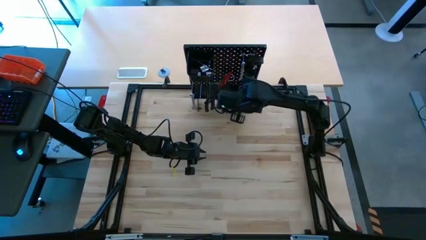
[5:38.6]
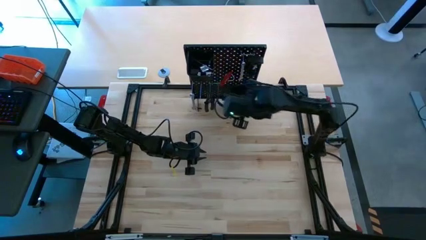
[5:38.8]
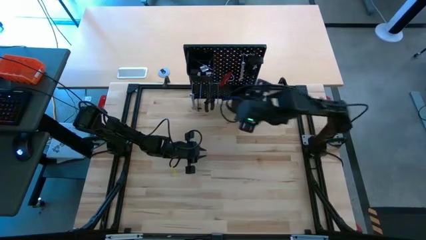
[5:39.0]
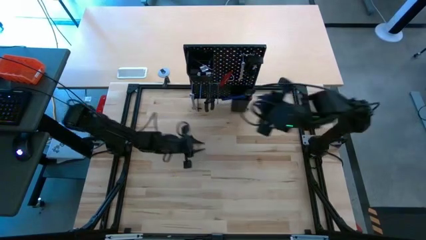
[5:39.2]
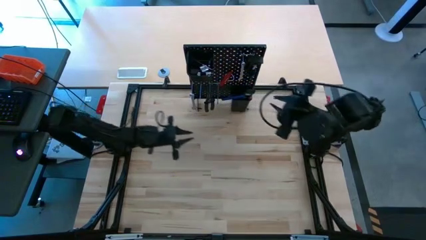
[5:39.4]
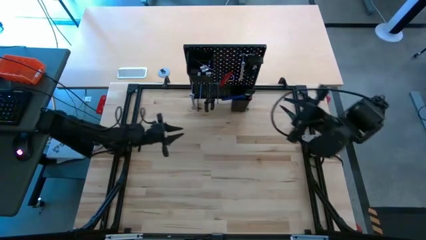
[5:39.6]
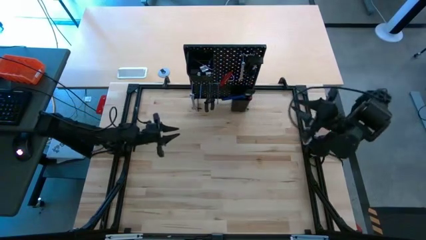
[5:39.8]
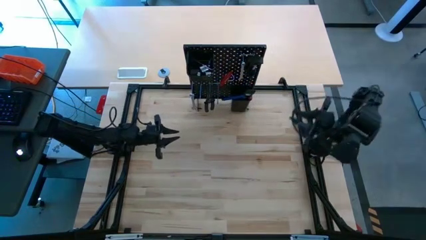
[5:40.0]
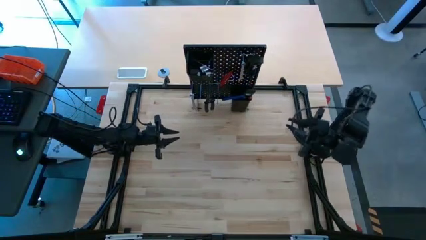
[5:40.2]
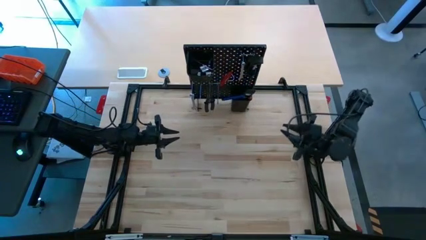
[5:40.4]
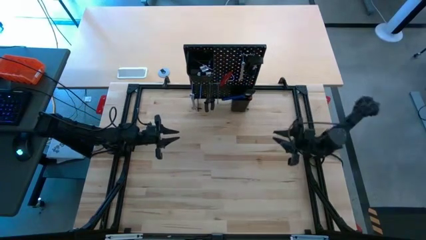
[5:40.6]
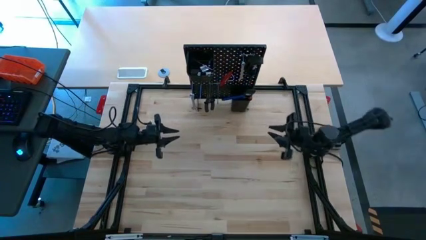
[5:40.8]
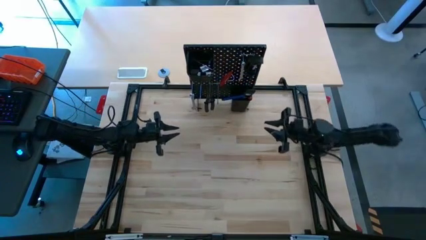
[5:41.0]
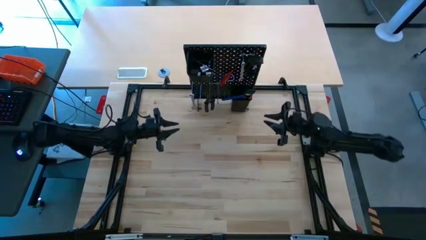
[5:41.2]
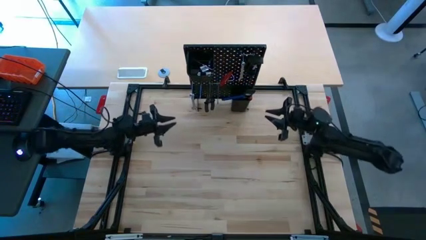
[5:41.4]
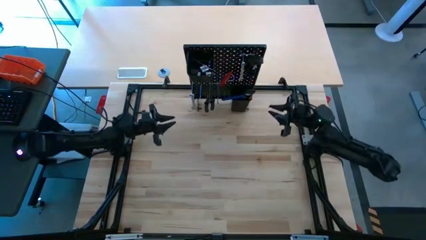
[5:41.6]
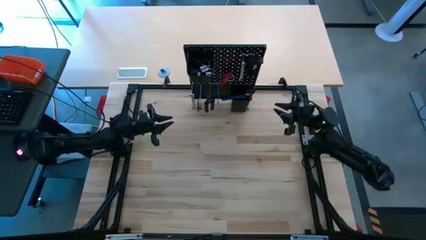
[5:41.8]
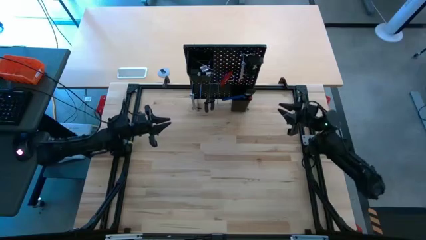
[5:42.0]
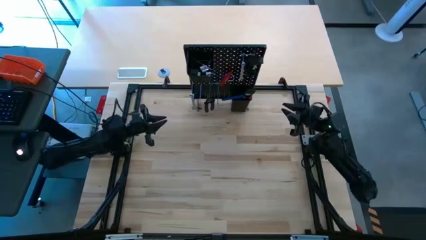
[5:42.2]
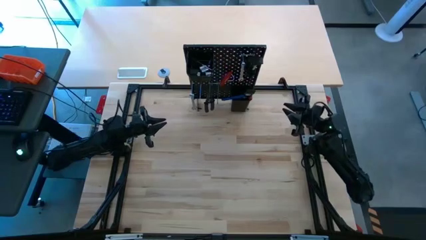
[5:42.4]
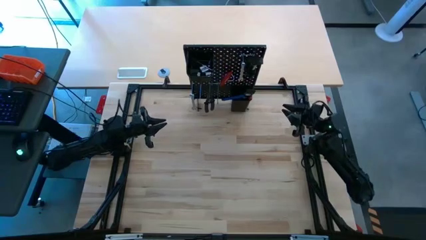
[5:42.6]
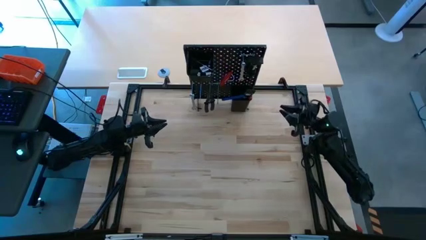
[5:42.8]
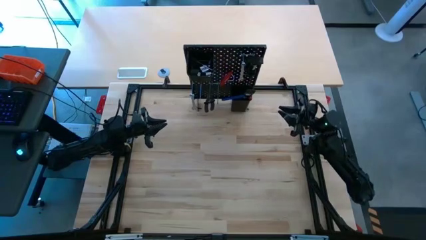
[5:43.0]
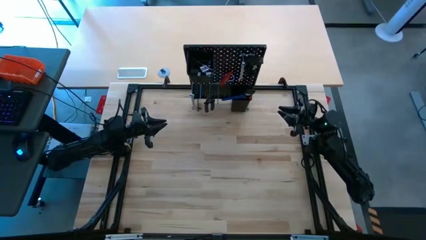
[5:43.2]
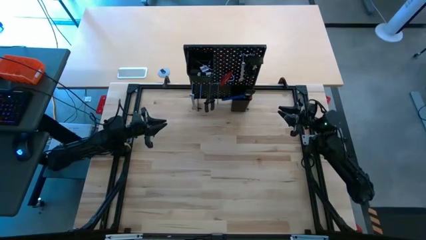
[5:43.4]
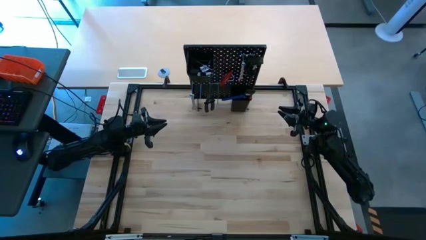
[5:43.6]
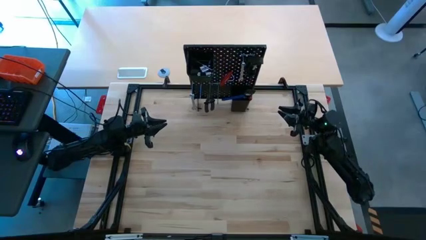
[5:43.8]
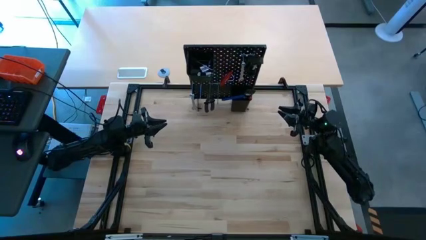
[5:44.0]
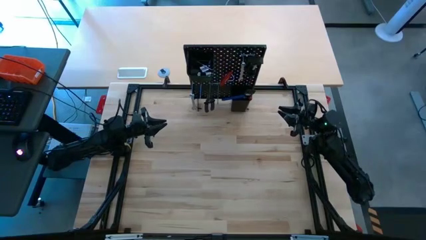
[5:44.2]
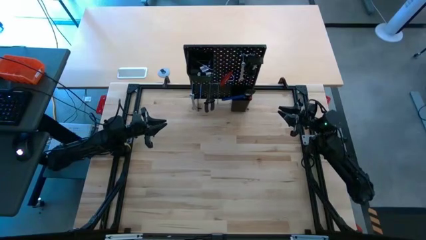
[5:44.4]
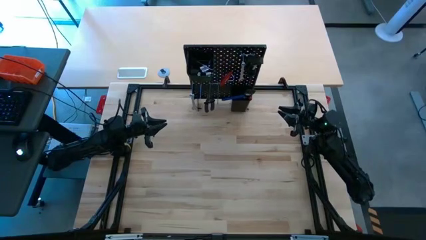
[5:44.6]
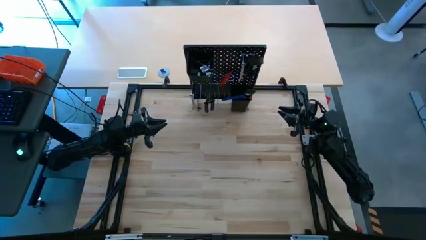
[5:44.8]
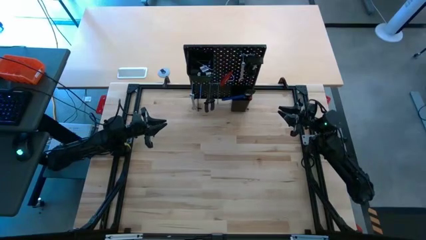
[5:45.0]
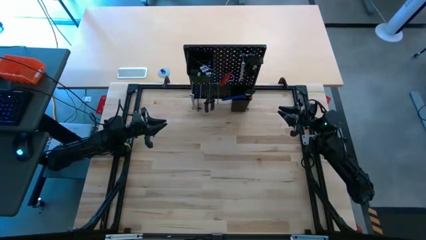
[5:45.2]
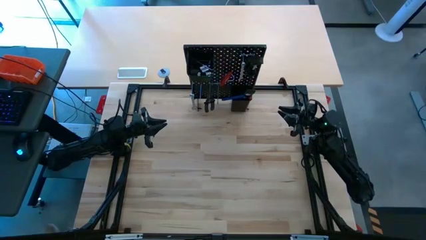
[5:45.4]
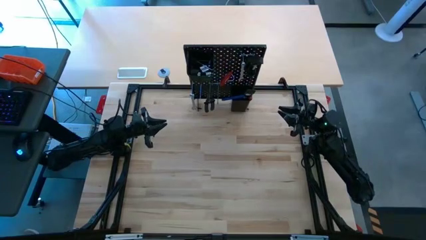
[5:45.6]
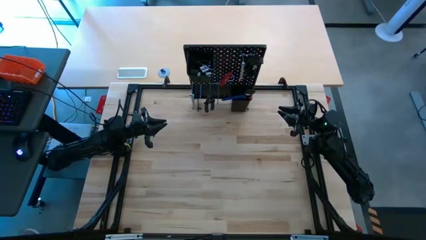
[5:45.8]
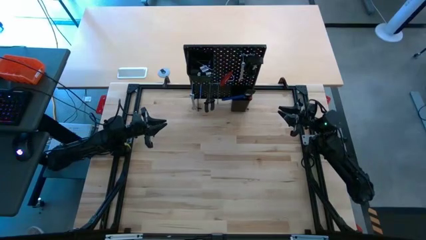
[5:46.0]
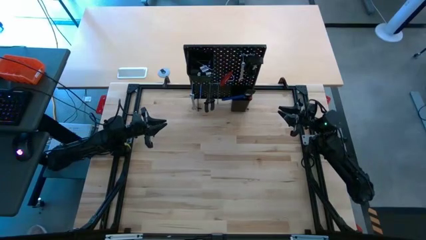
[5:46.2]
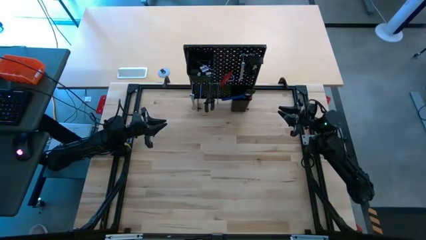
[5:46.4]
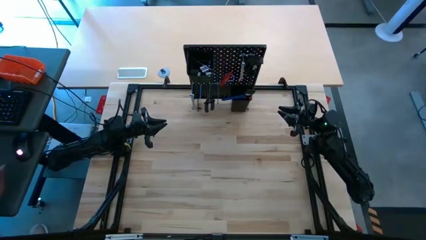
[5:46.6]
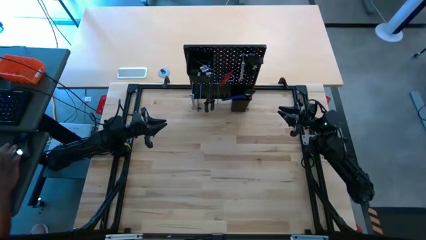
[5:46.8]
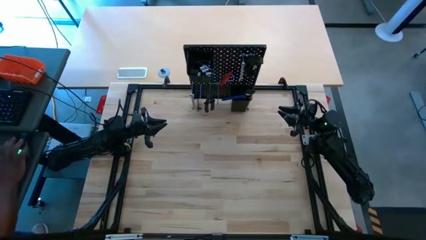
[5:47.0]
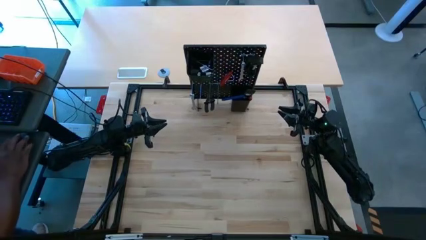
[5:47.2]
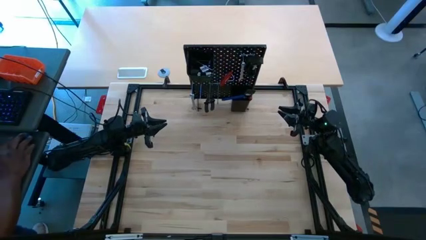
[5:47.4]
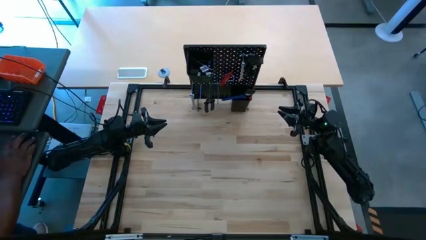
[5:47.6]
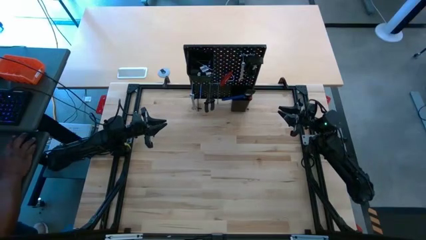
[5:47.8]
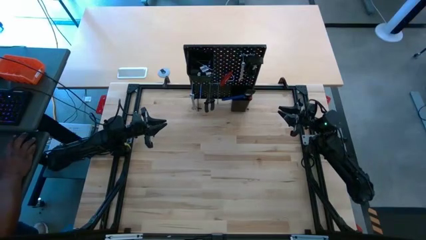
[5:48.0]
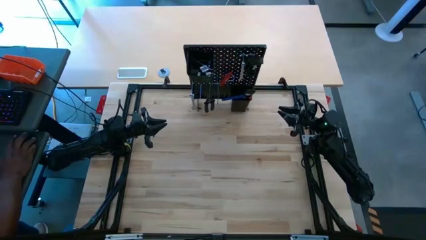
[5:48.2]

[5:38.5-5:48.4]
Task: Hang tools onto peg board
Return to Home Position
